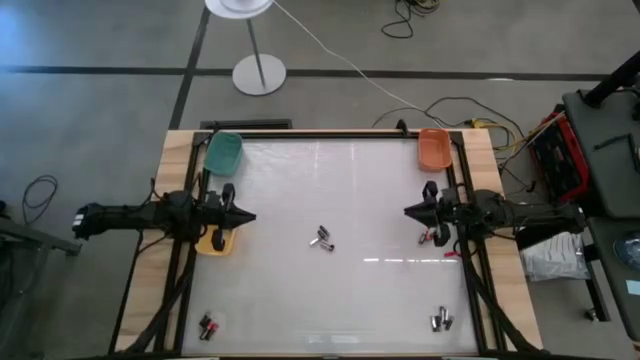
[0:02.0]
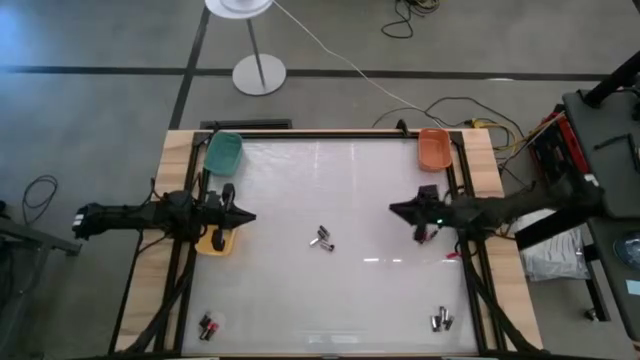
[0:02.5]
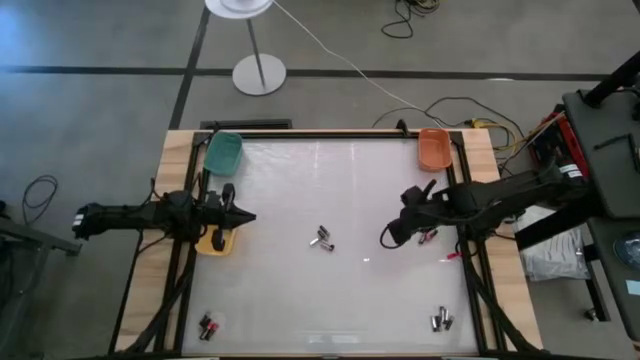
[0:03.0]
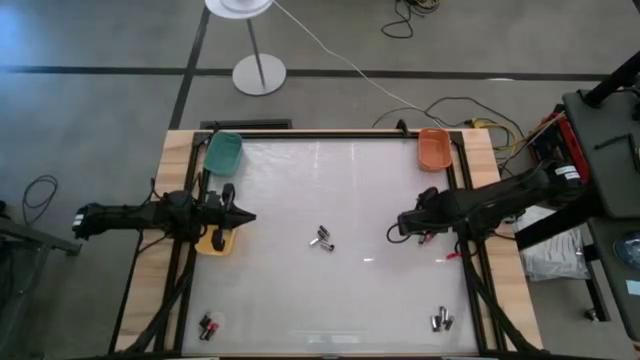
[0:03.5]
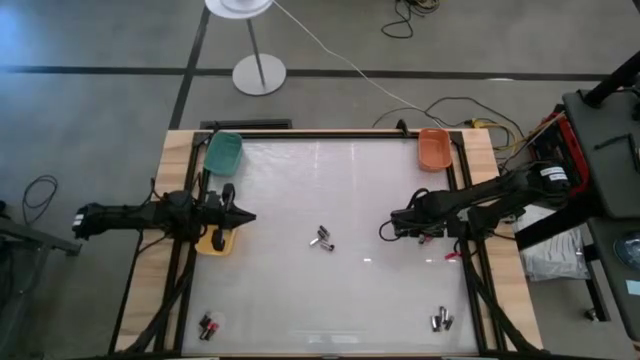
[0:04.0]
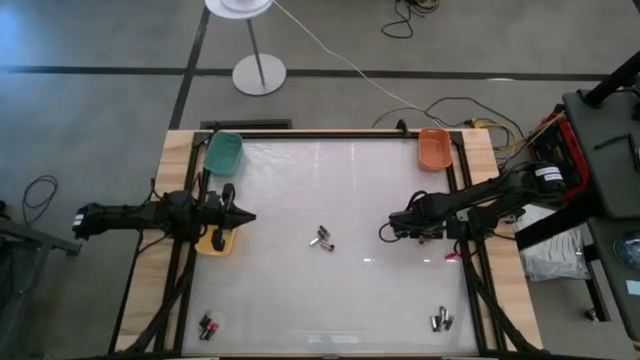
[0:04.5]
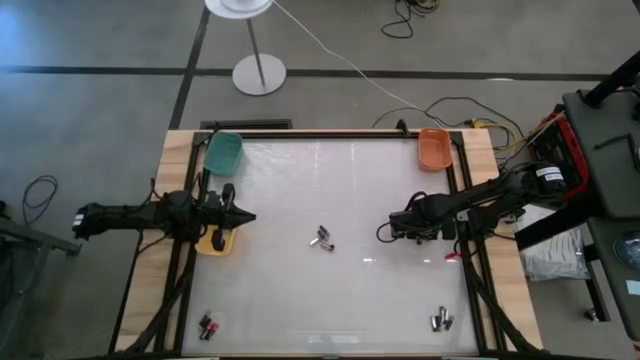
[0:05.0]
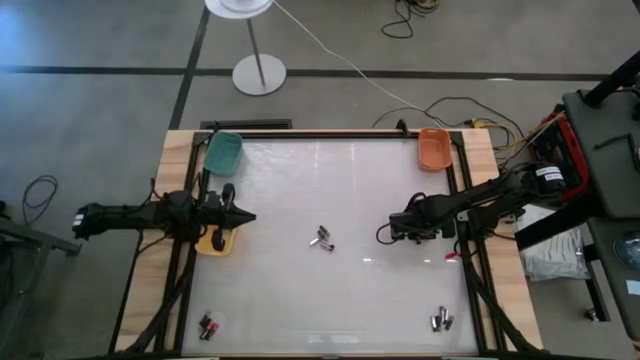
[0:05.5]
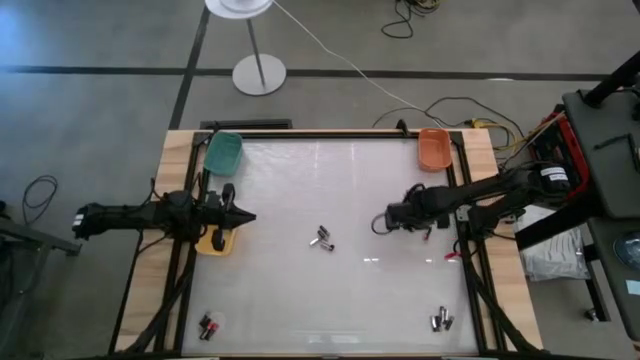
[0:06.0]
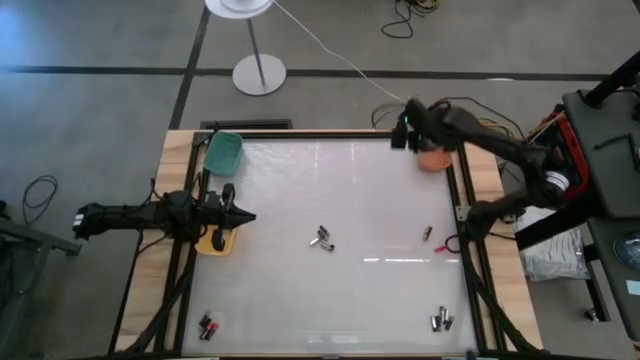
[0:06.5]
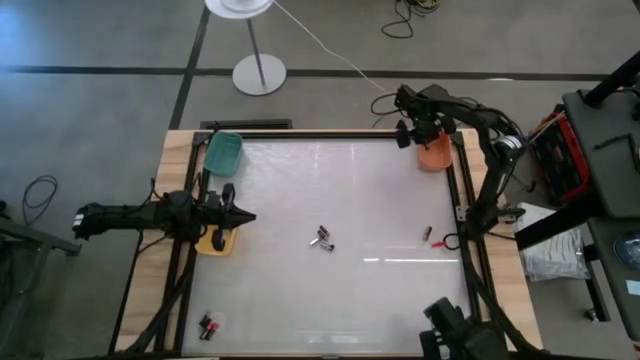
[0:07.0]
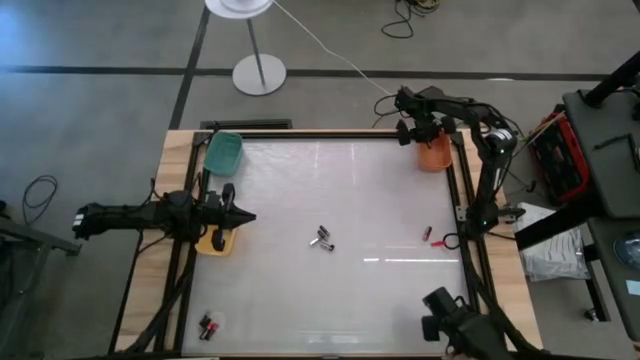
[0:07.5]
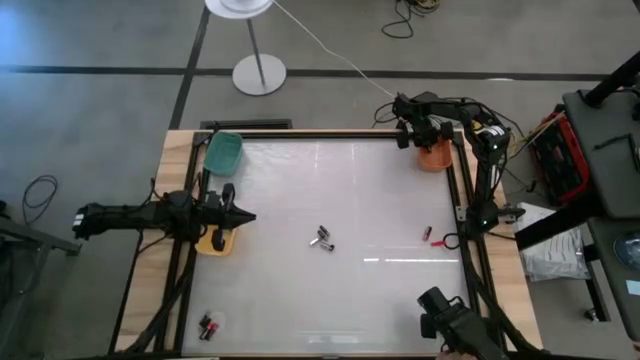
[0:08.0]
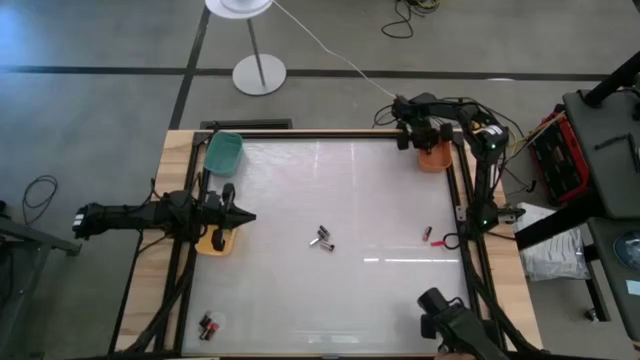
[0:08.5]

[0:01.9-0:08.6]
Task: Sort batteries
Put the red battery into the orange bin

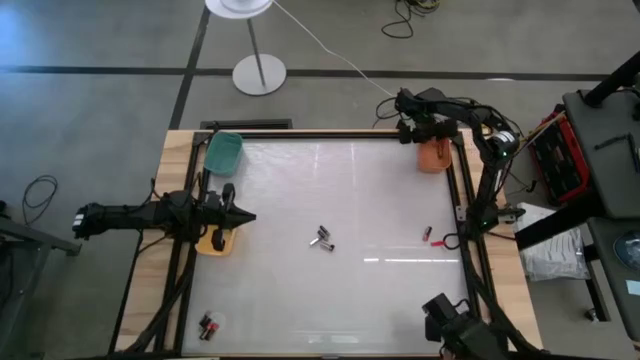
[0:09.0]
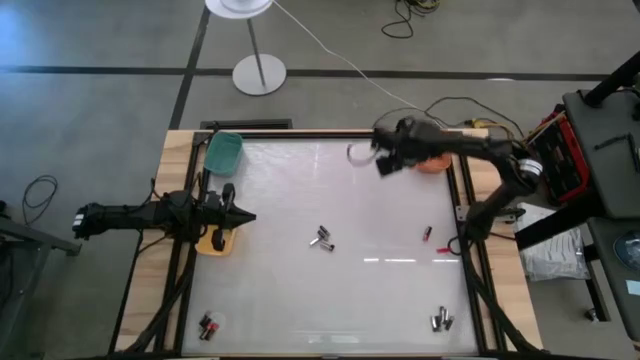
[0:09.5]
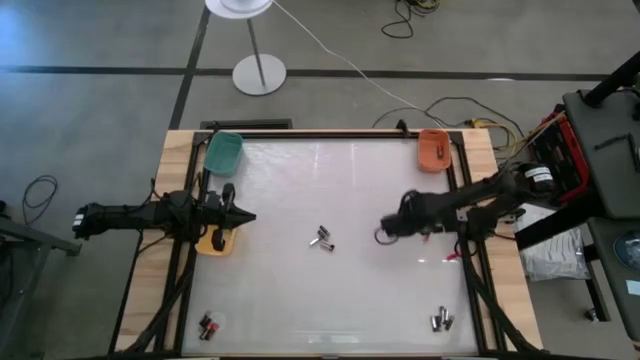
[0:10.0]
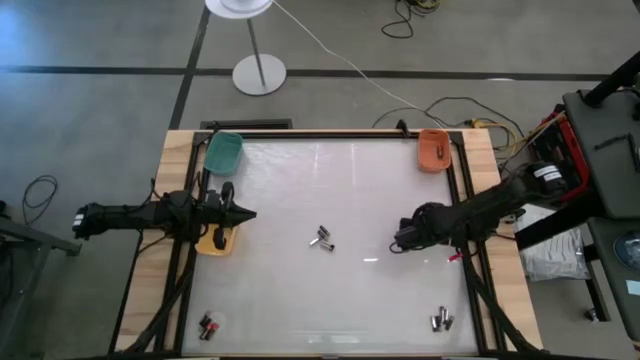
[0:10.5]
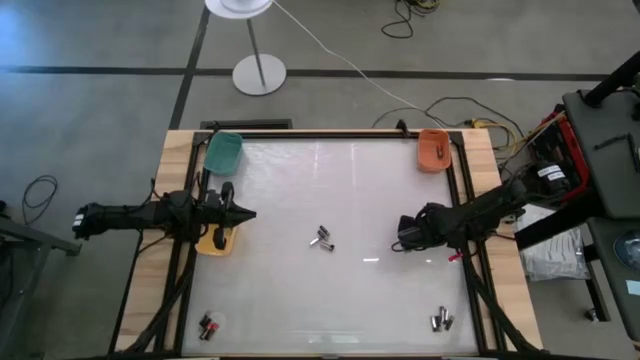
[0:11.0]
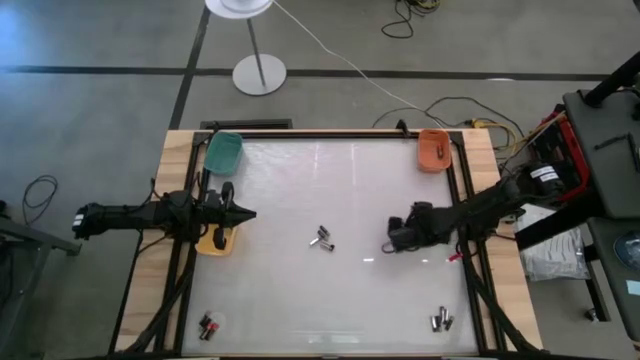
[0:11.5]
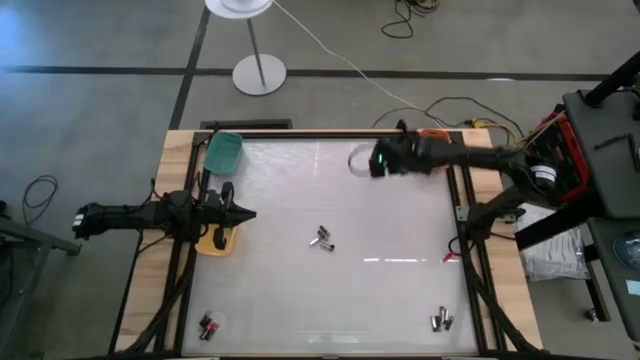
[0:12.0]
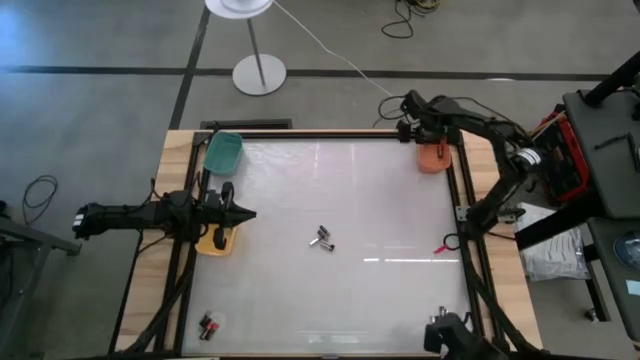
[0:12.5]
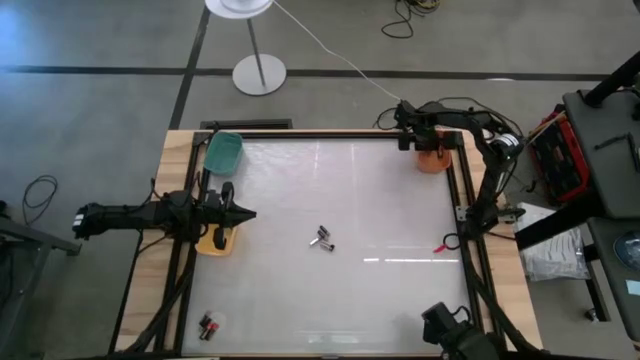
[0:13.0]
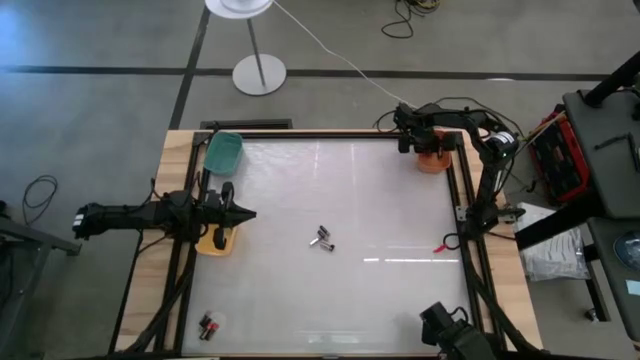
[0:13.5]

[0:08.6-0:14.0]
Put the red battery into the orange bin

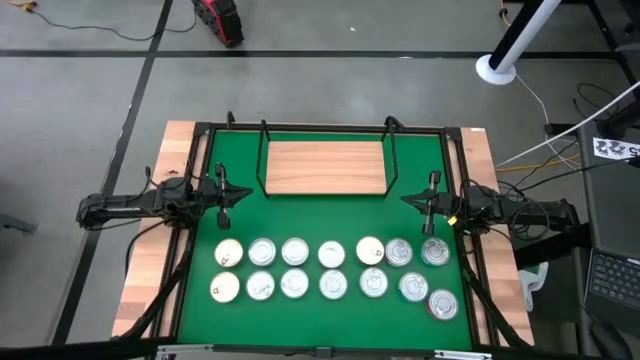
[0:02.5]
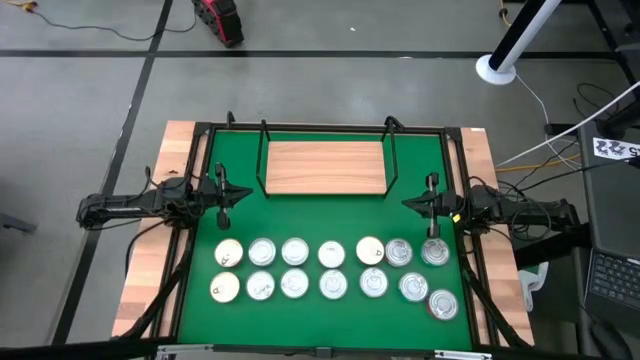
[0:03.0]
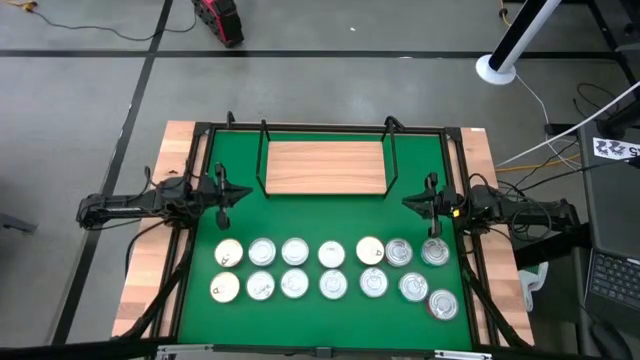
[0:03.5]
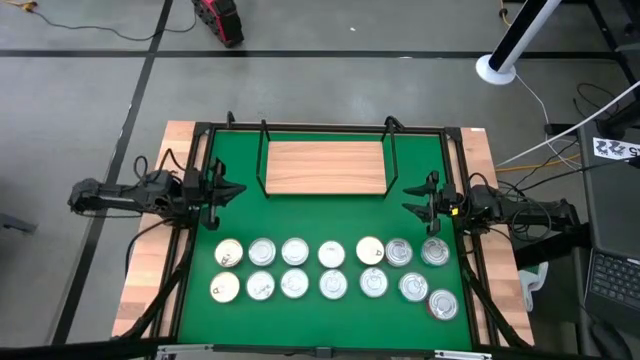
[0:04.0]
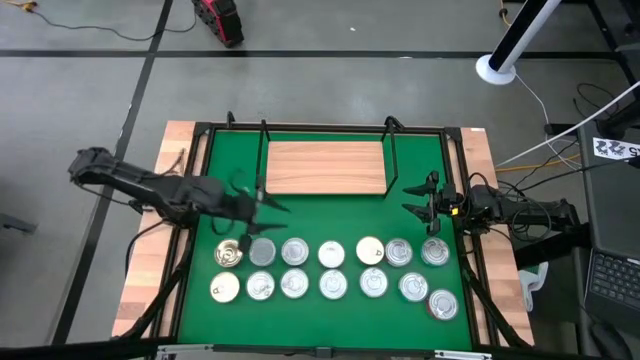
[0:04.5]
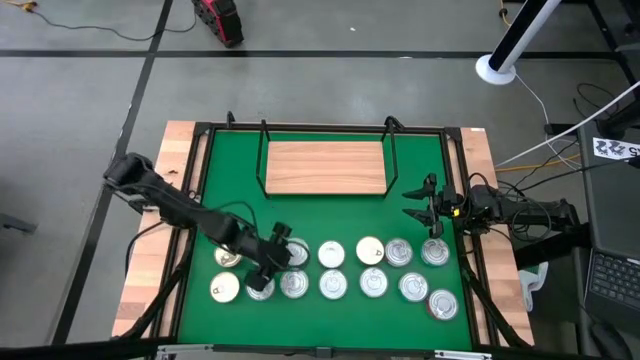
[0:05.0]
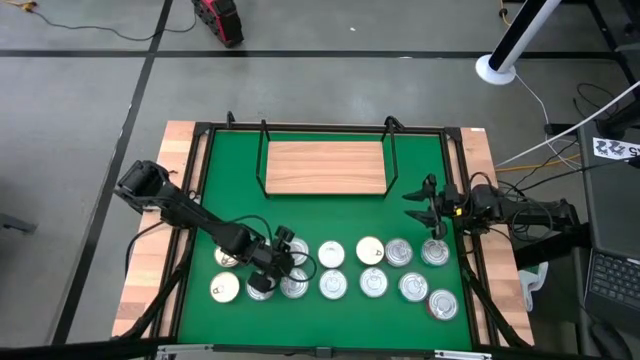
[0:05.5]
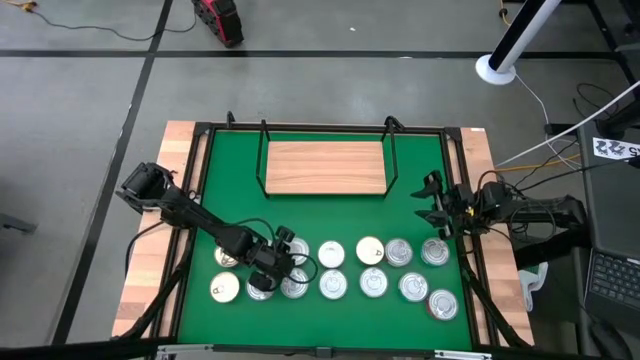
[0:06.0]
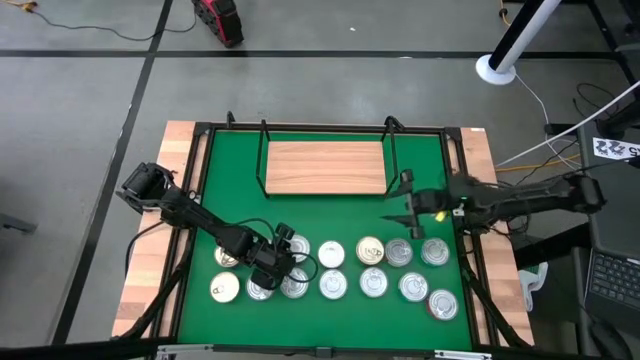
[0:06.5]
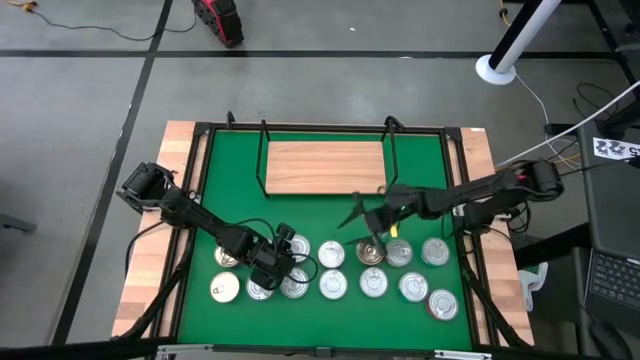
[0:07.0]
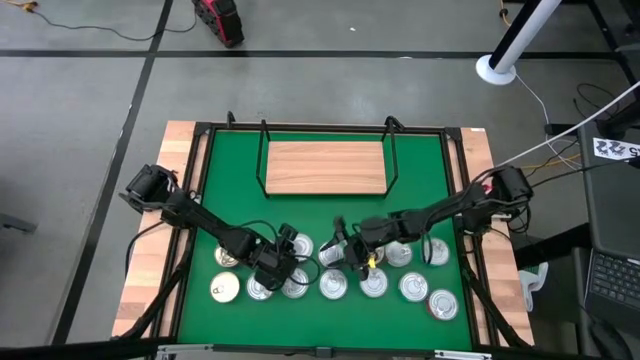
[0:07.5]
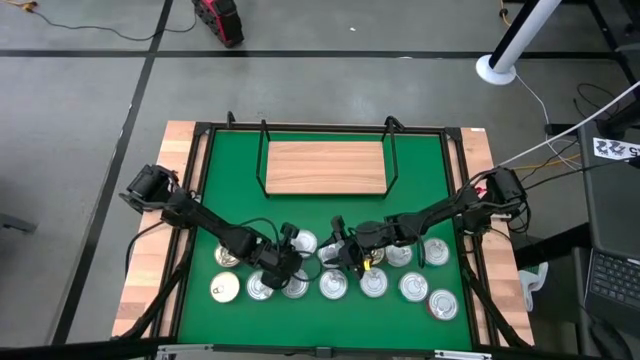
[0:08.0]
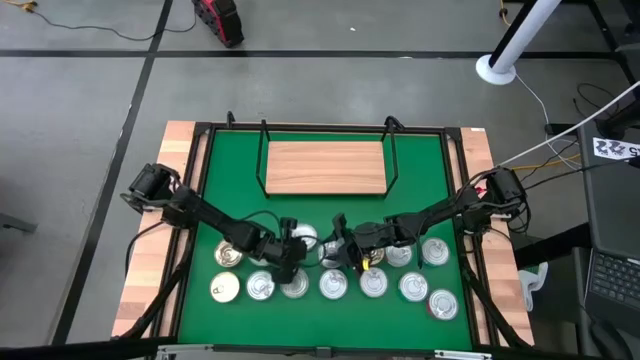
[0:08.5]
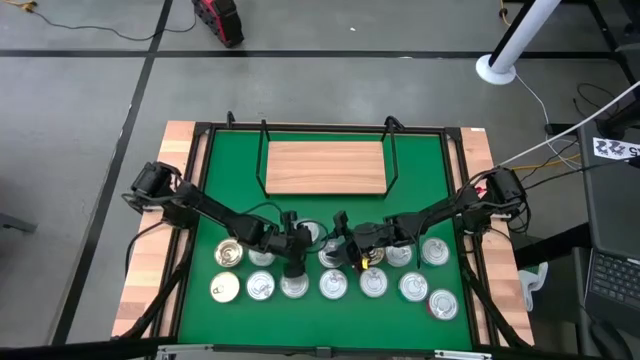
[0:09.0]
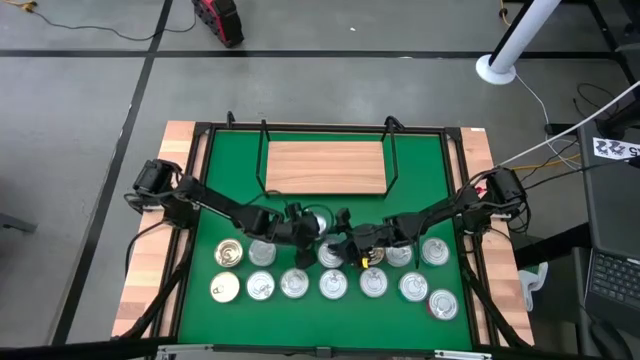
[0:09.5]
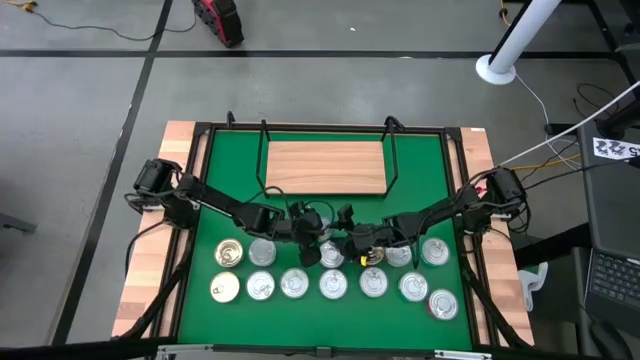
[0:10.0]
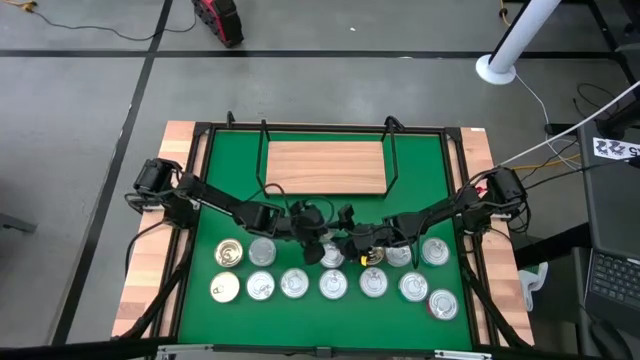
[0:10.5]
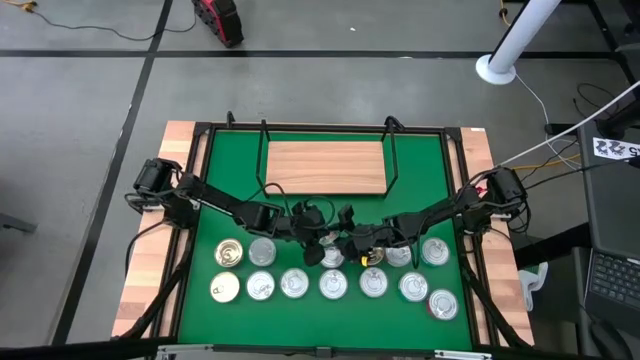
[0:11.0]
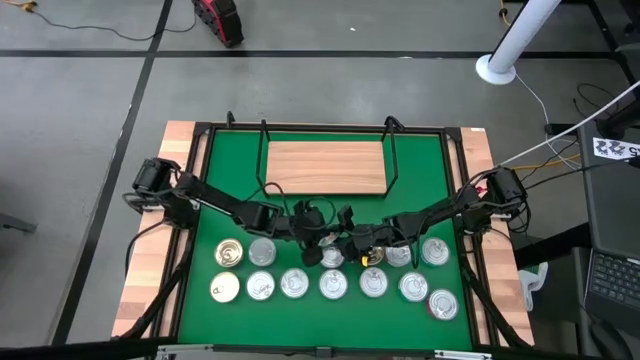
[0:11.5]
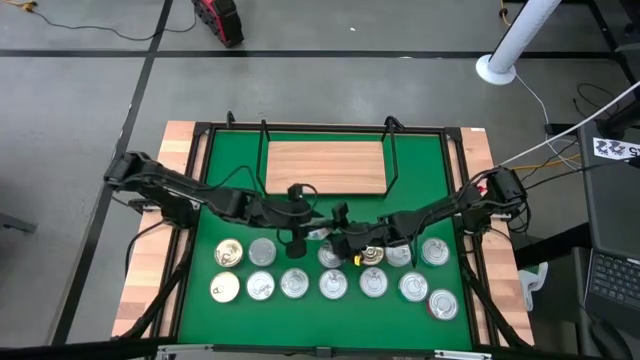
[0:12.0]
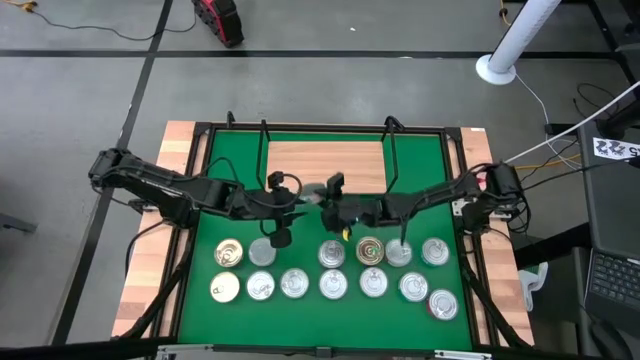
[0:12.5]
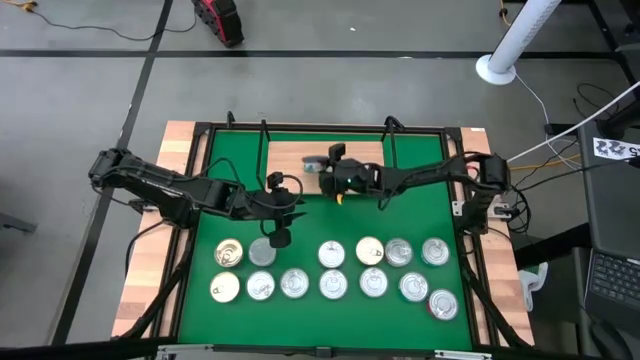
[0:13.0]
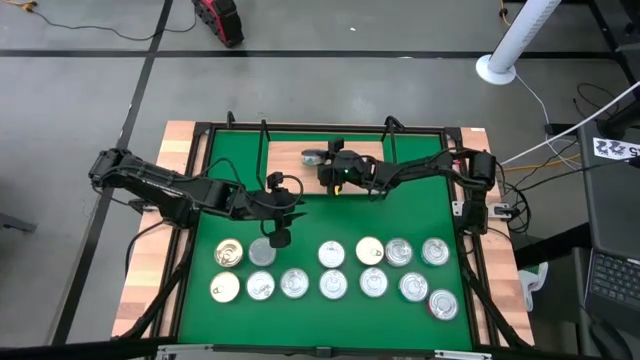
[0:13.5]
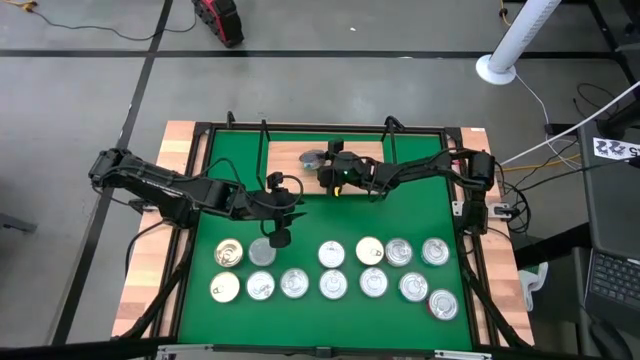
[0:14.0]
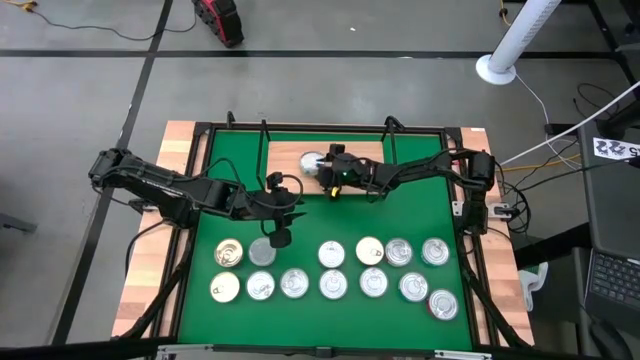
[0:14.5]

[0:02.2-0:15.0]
Task: Stack canned seafood by type on shelf
Put the green white tuna can on the shelf
